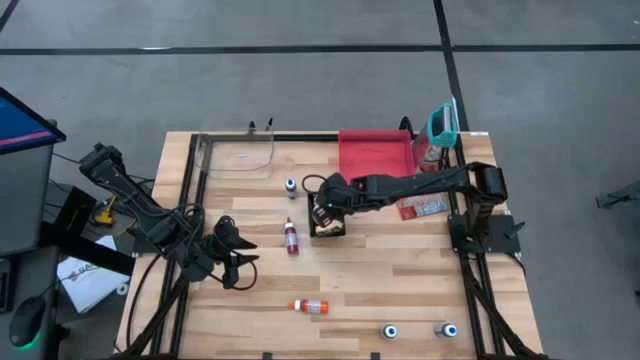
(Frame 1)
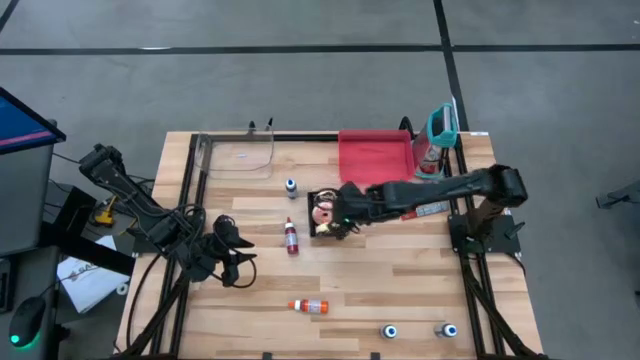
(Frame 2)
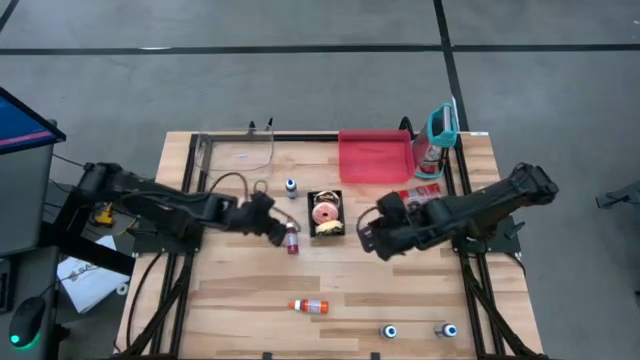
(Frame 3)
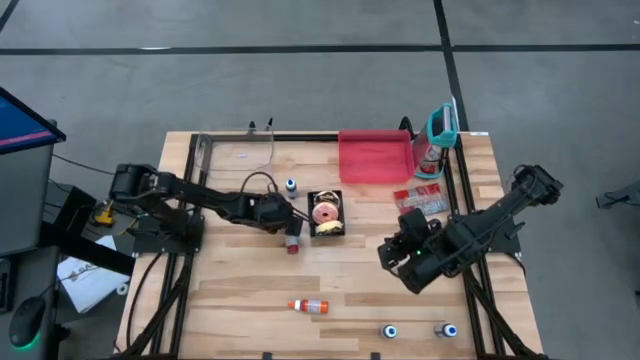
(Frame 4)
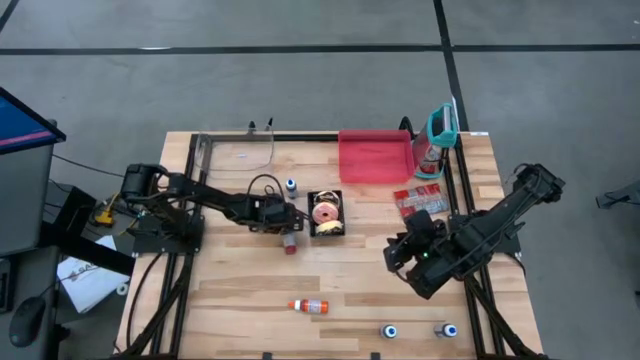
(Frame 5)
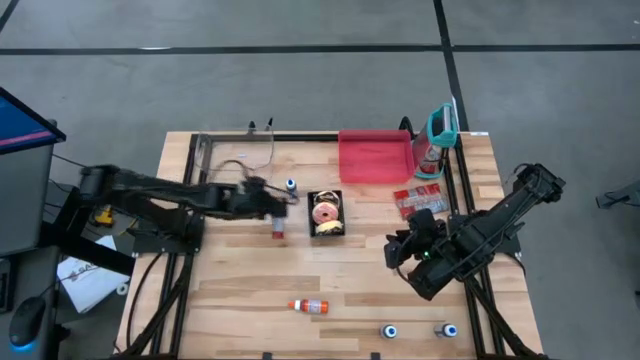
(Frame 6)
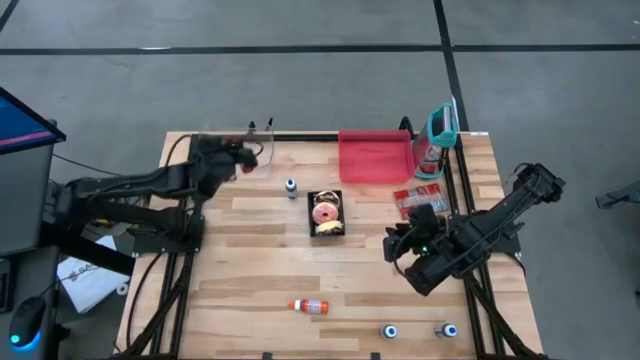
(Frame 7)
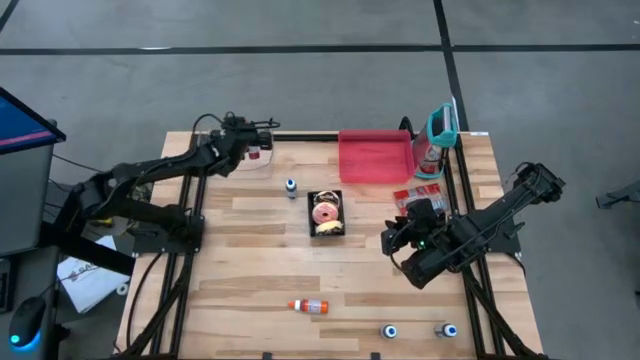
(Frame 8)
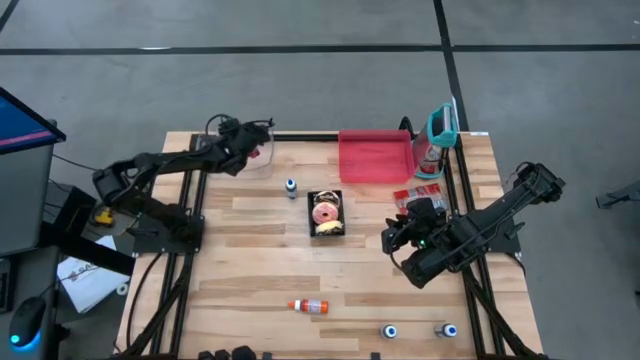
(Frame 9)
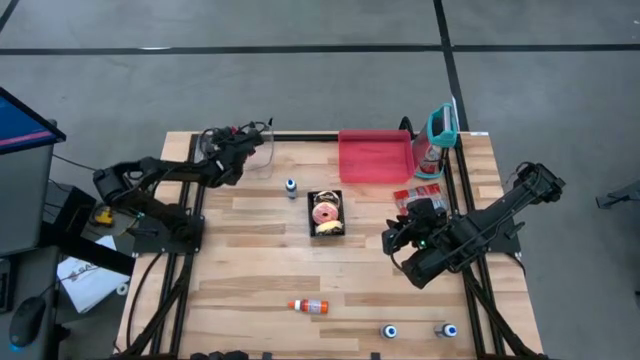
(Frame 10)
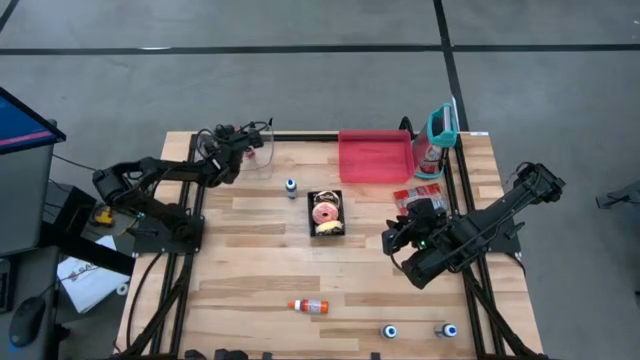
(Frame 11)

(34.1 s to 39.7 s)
Put the red food coloring bottle into the transparent bin

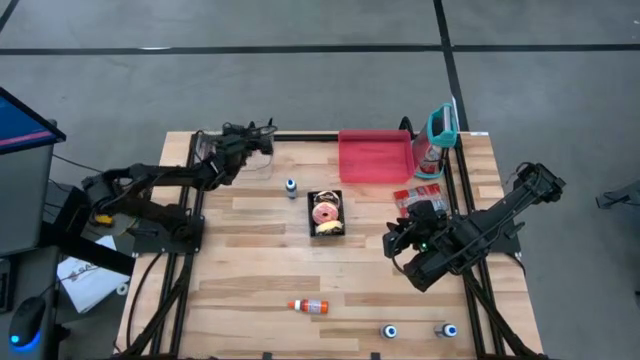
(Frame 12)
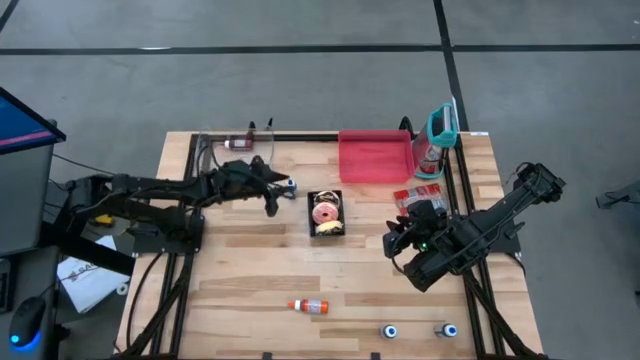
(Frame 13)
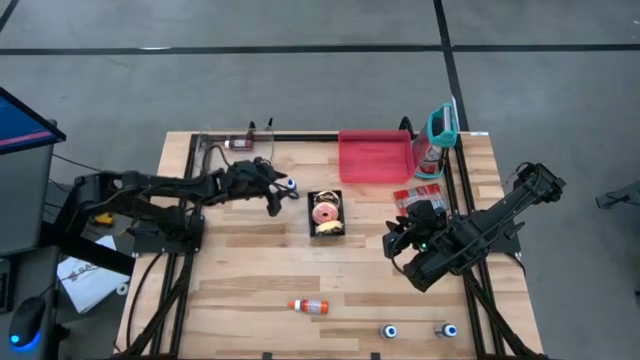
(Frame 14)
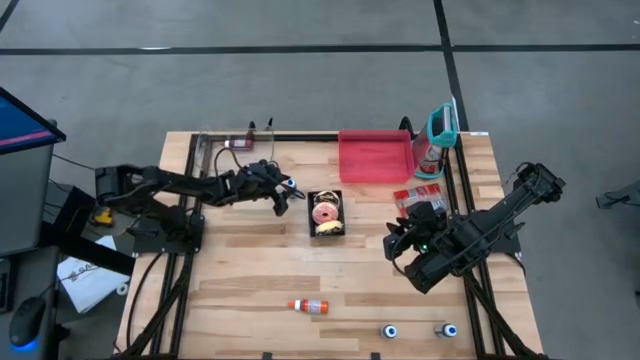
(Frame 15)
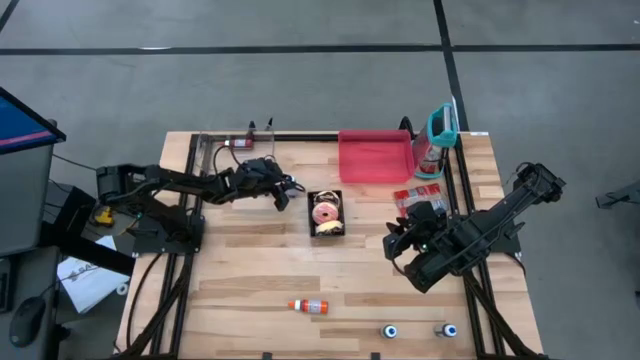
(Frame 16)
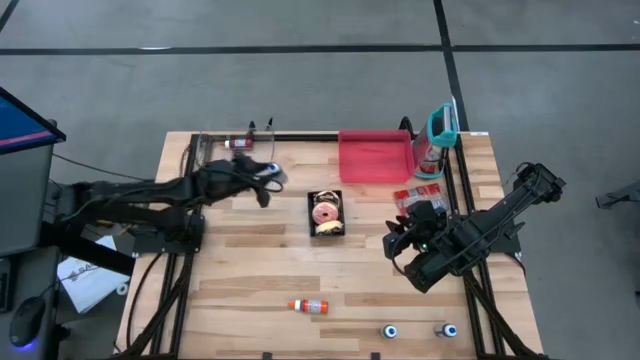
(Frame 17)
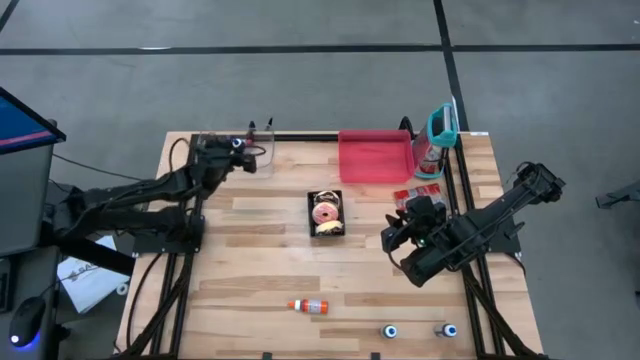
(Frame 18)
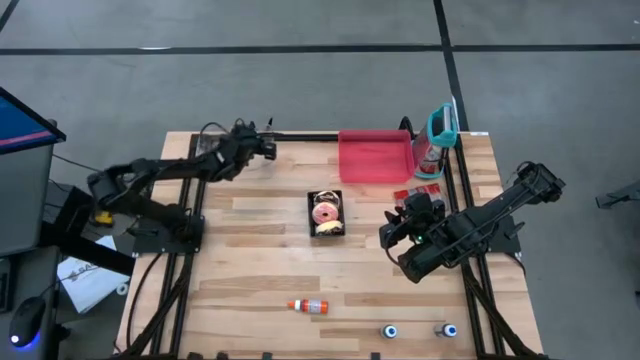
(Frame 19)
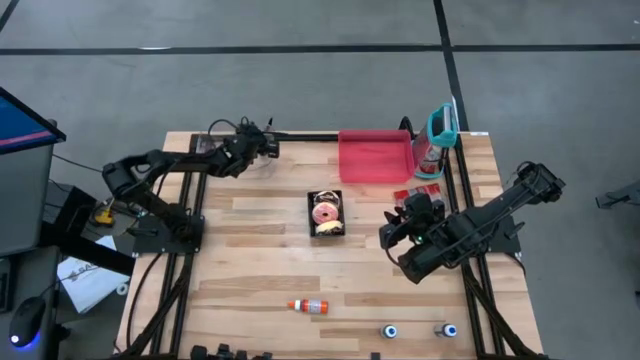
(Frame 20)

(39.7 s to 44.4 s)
Put the top left blue food coloring bottle into the transparent bin

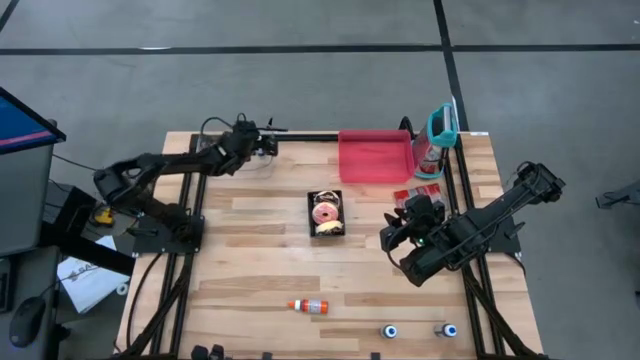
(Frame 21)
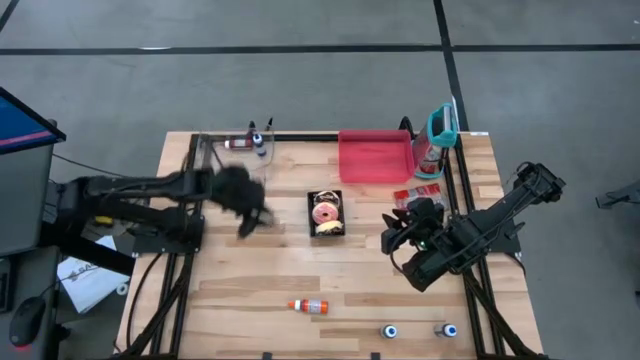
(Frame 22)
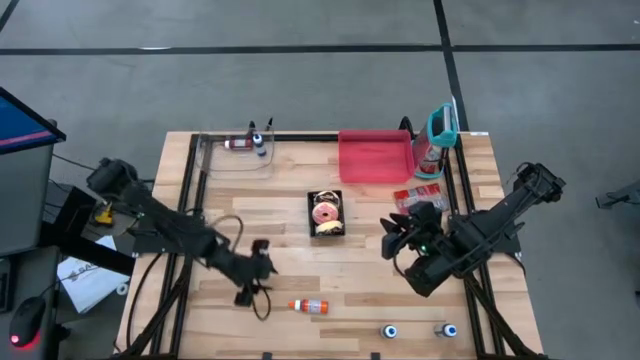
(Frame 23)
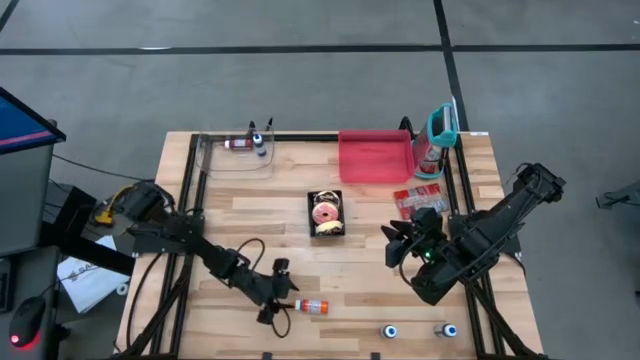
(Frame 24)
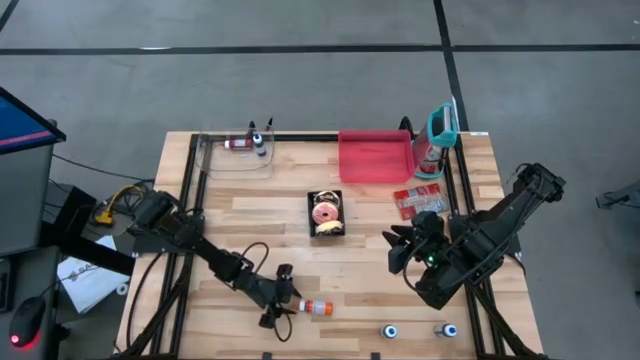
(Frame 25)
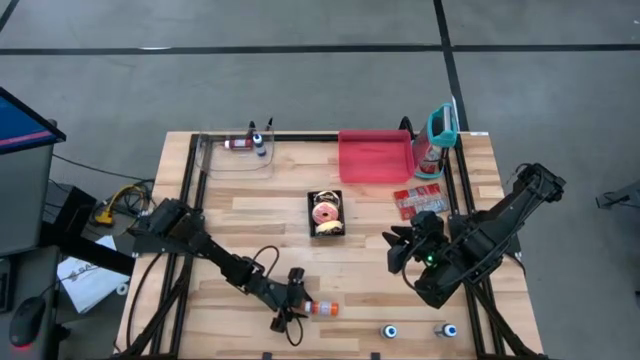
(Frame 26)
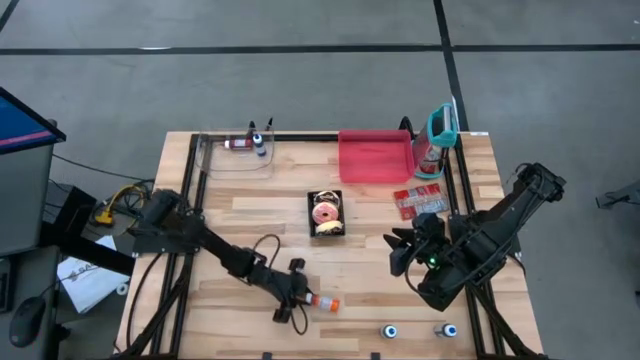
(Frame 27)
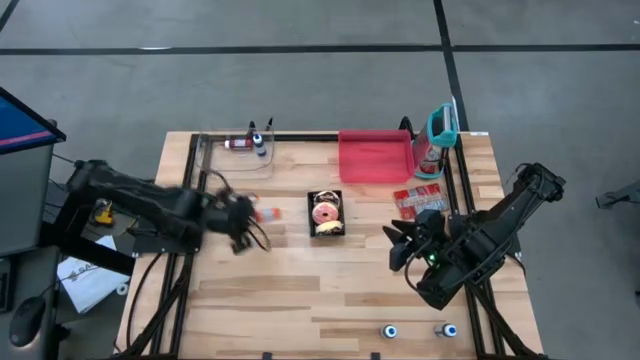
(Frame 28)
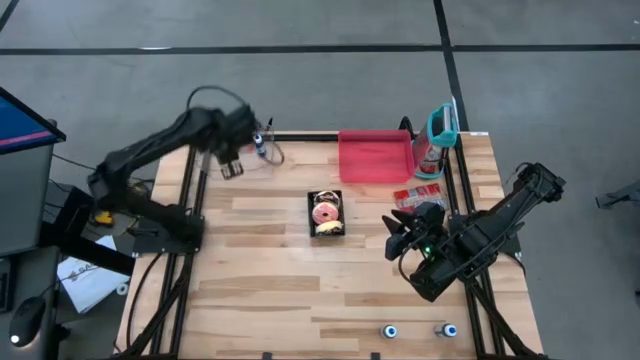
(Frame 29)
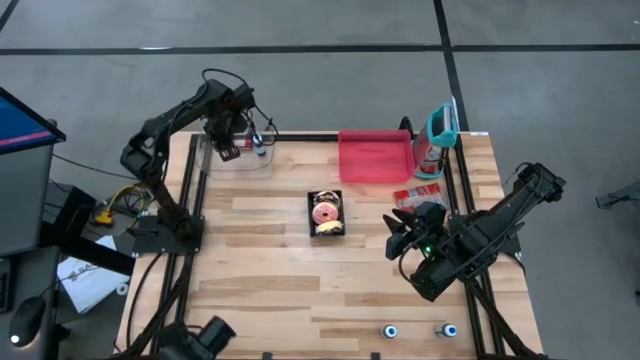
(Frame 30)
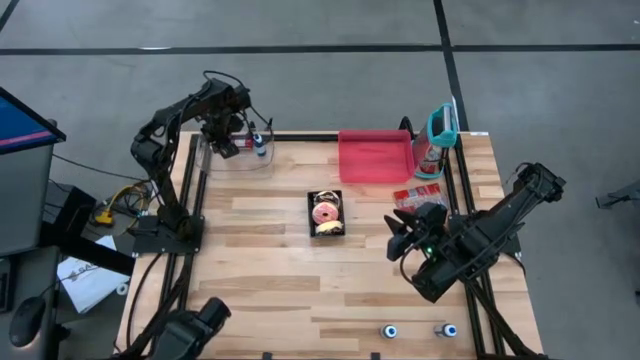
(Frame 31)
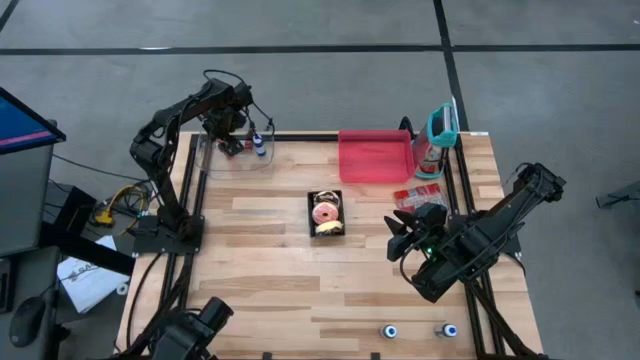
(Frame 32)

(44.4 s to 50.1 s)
Put the orange food coloring bottle into the transparent bin

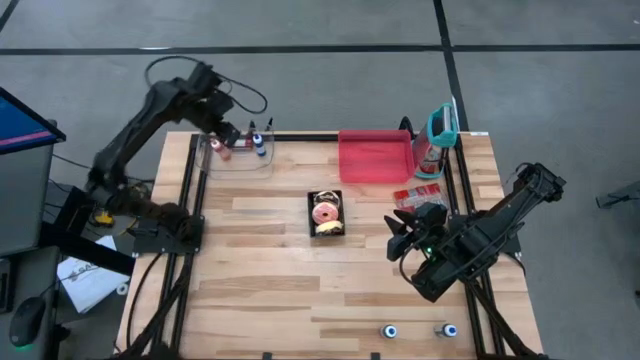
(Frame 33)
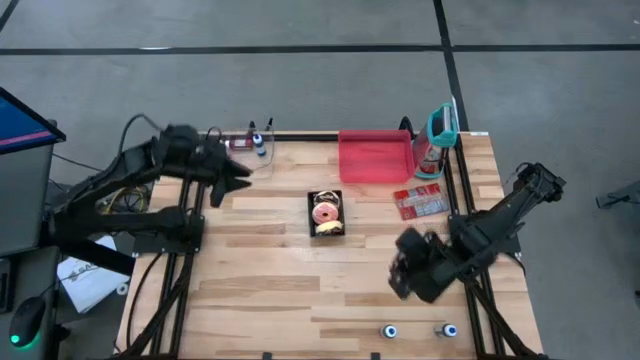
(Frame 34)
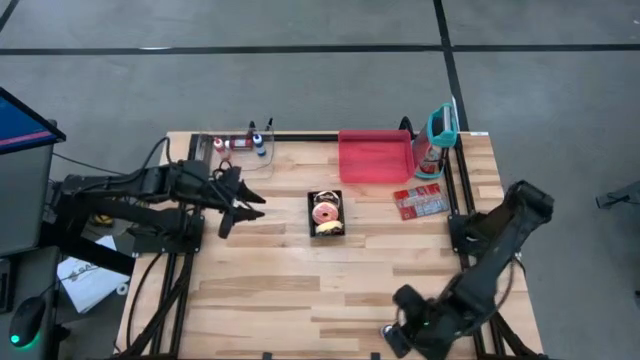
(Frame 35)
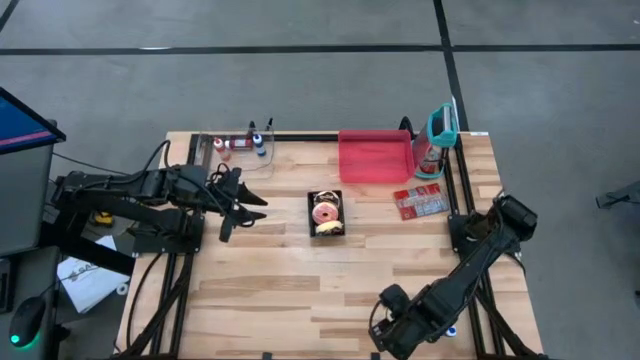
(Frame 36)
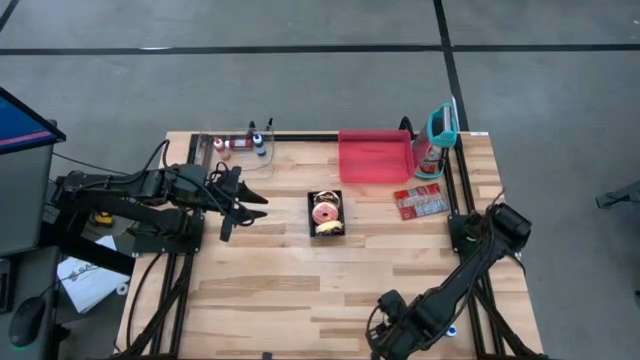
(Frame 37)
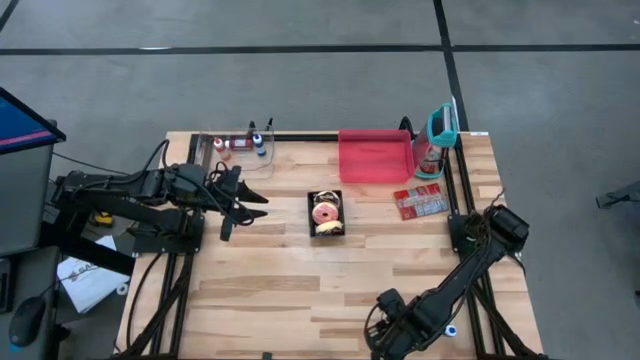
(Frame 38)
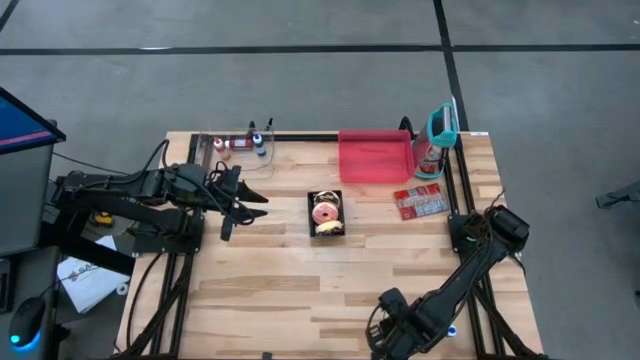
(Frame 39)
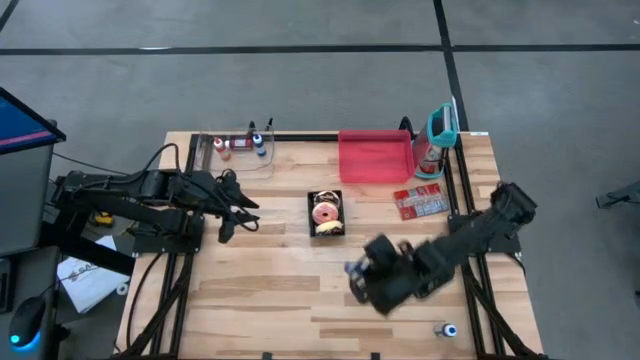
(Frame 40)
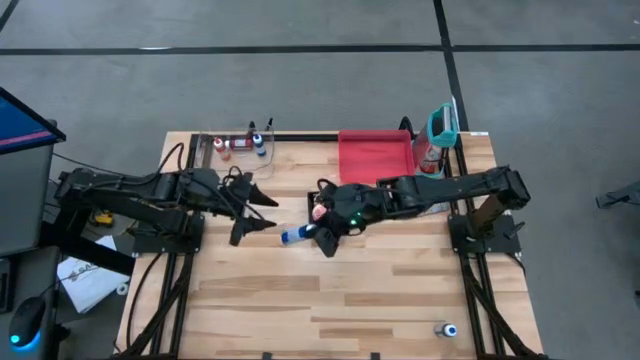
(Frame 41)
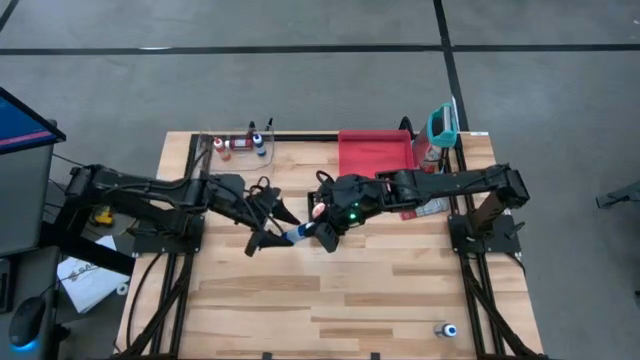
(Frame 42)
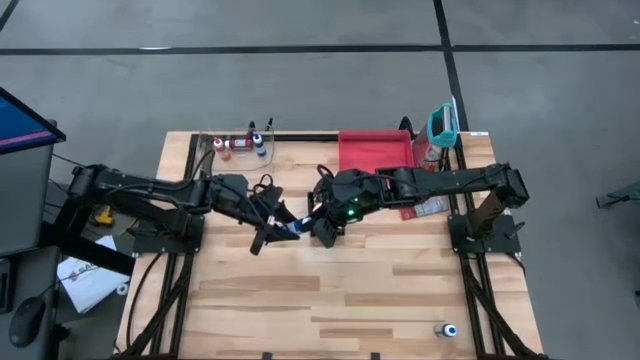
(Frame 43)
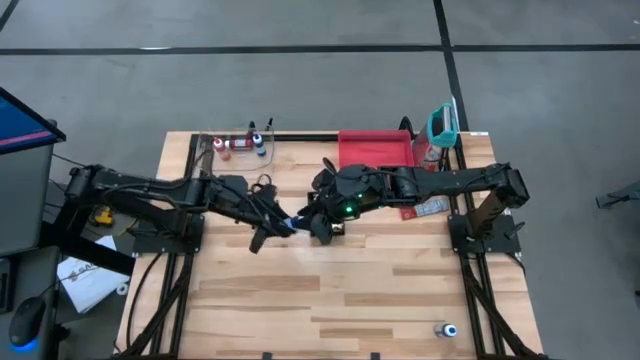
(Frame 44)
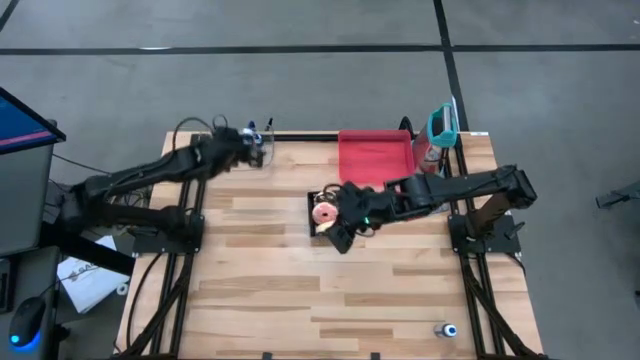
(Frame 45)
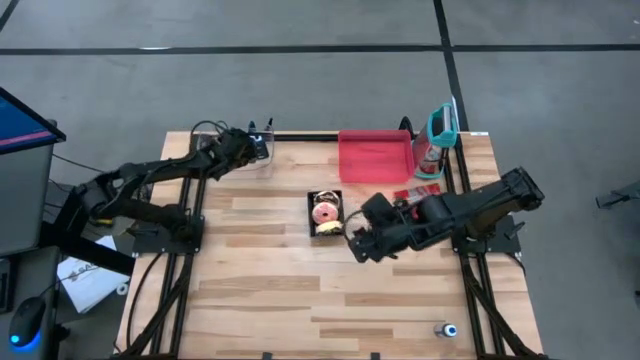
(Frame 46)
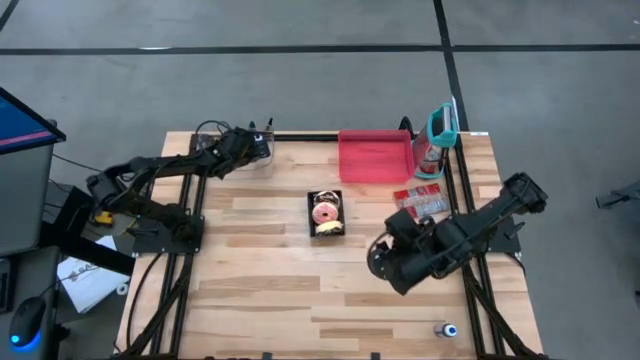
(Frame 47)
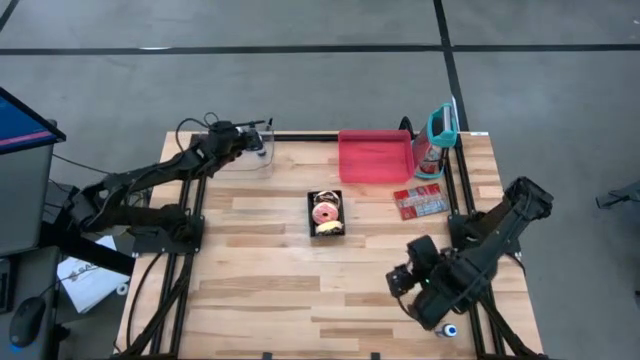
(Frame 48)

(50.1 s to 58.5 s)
Put the left blue food coloring bottle into the transparent bin
